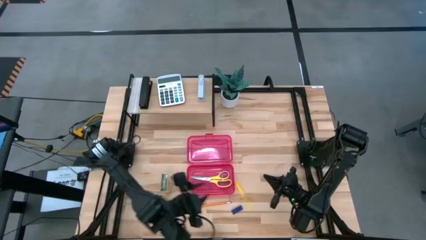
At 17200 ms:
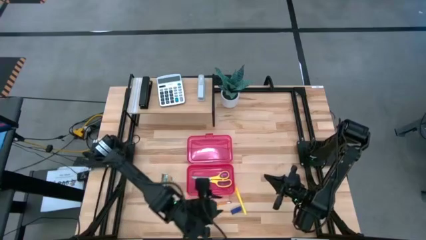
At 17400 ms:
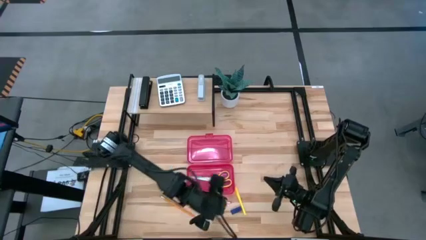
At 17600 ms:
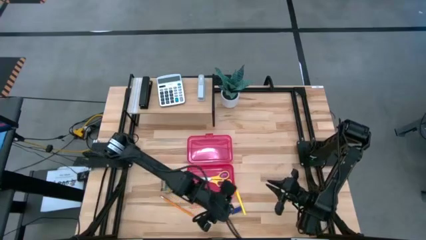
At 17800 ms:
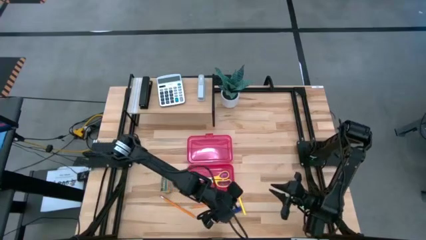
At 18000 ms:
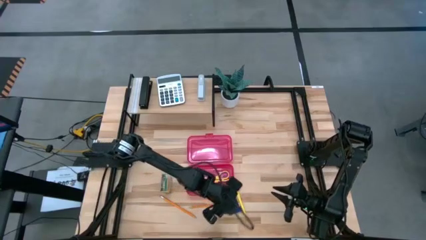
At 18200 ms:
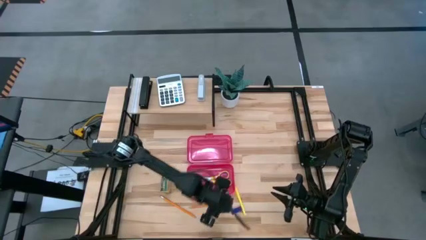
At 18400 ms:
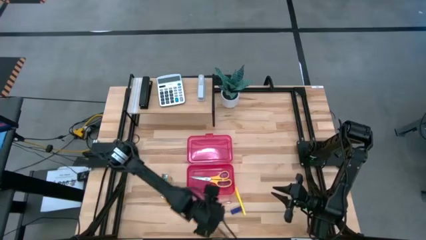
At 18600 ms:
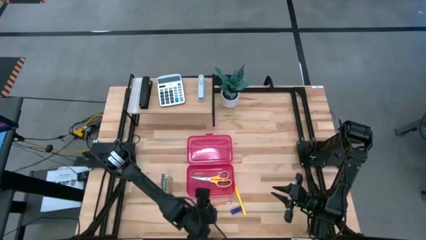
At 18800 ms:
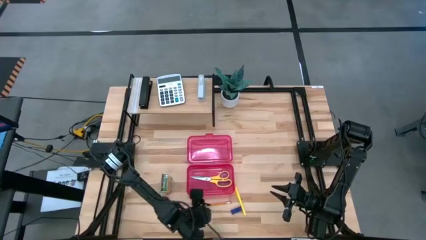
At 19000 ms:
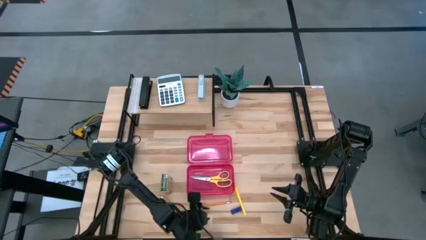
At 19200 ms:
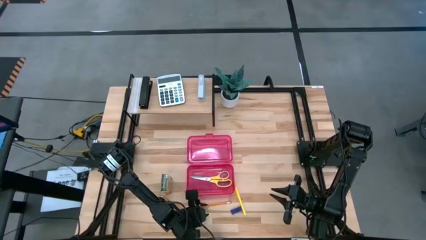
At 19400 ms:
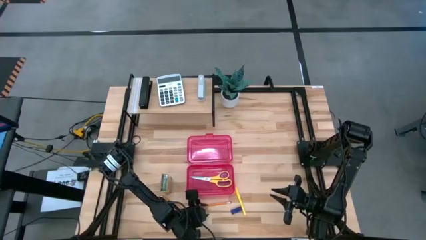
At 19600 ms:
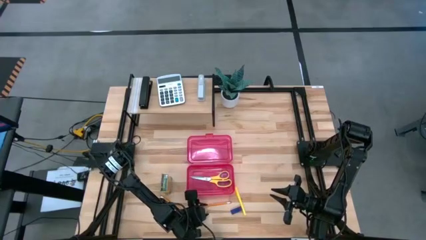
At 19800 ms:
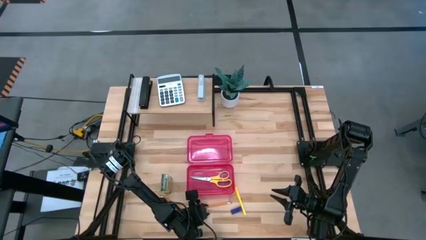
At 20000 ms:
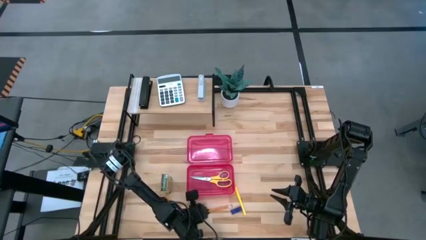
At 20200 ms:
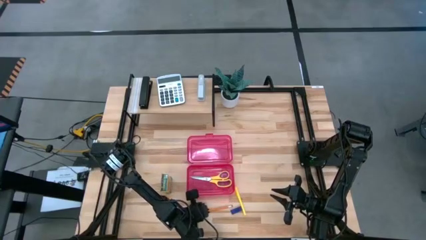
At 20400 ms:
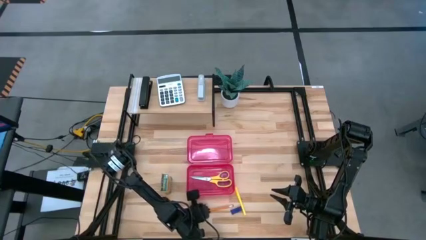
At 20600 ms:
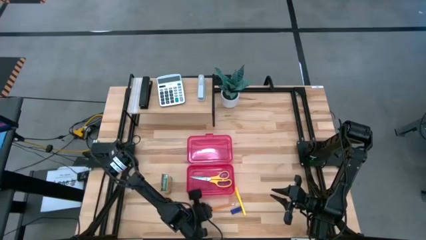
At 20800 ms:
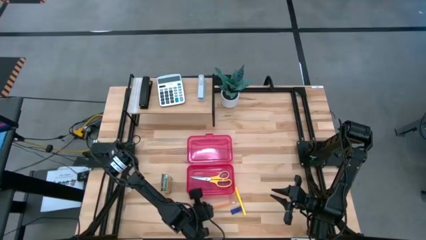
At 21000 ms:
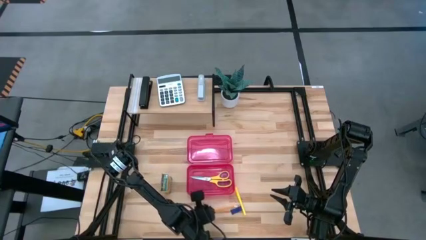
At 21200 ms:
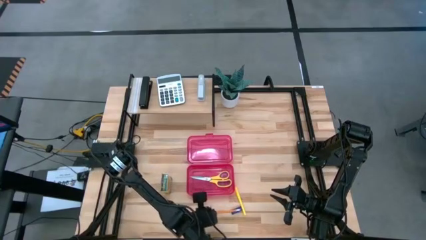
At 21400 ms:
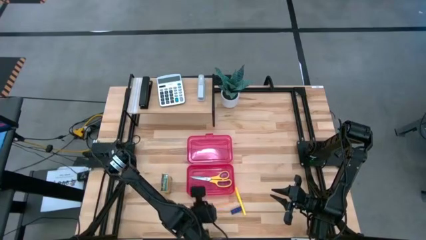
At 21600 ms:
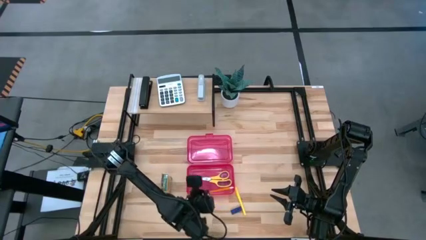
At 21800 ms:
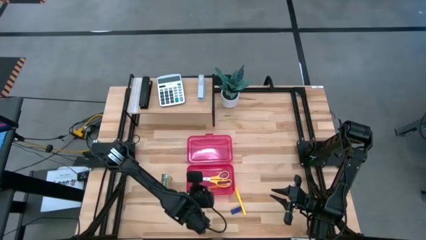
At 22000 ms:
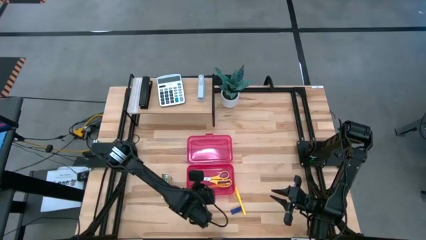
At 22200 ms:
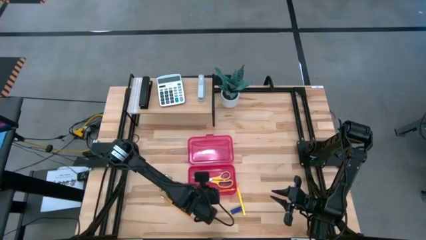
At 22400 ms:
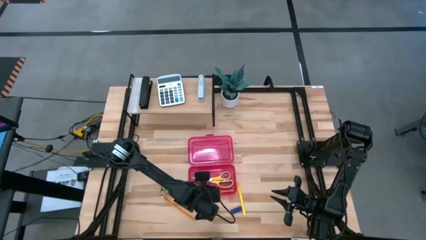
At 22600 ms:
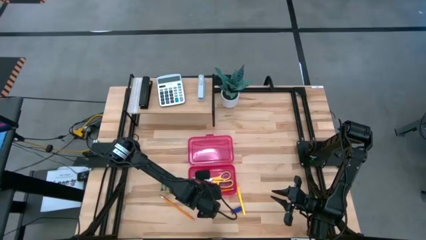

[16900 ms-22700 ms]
Task: Pack school essentials
Put the right orange pencil into the red supply box

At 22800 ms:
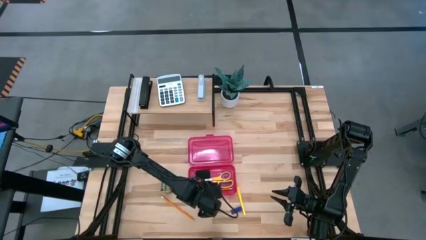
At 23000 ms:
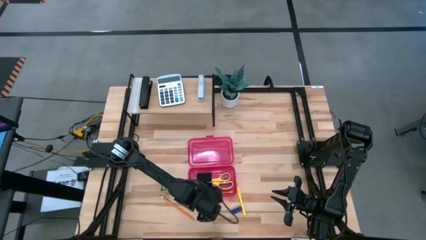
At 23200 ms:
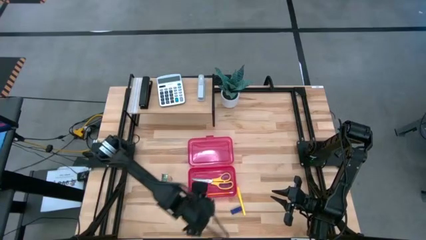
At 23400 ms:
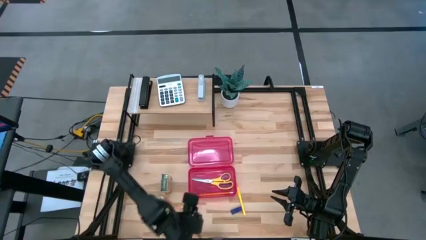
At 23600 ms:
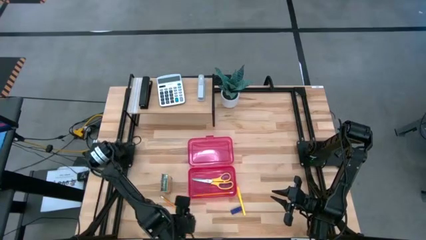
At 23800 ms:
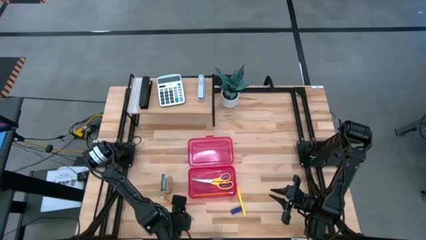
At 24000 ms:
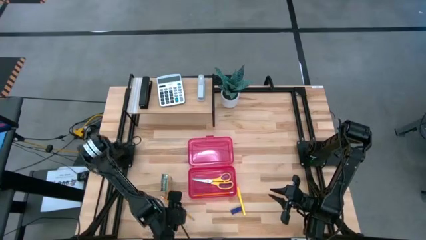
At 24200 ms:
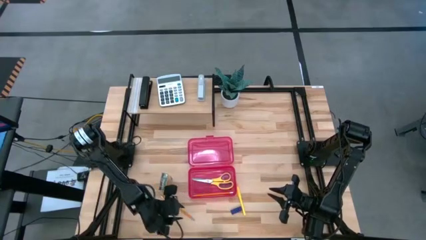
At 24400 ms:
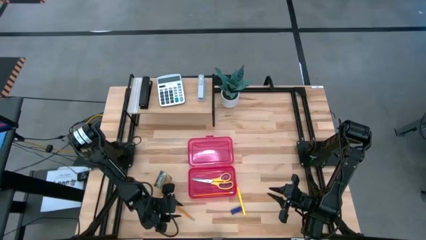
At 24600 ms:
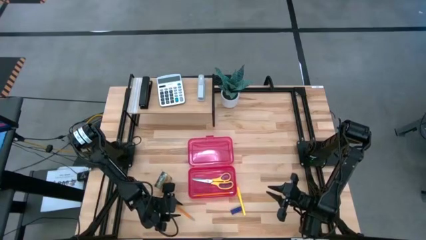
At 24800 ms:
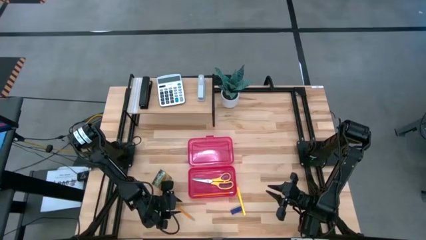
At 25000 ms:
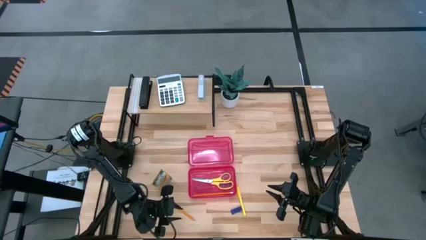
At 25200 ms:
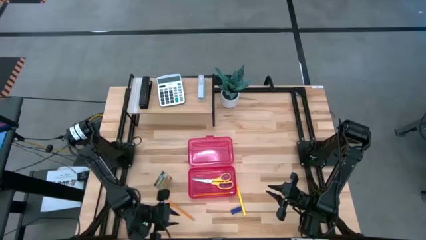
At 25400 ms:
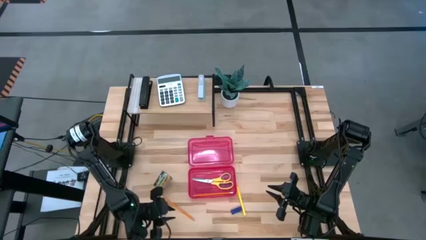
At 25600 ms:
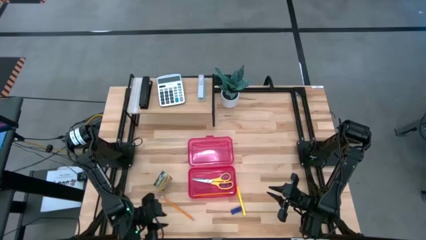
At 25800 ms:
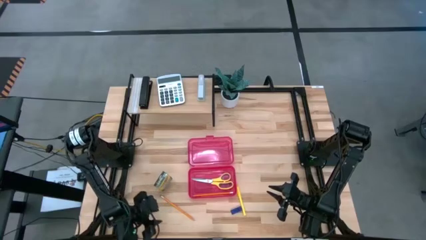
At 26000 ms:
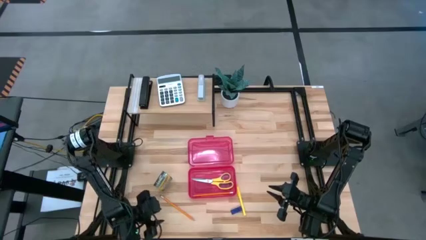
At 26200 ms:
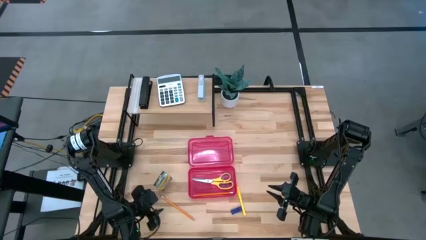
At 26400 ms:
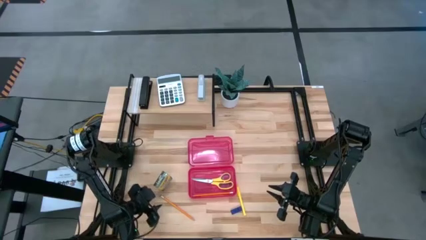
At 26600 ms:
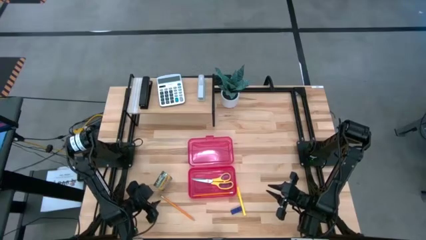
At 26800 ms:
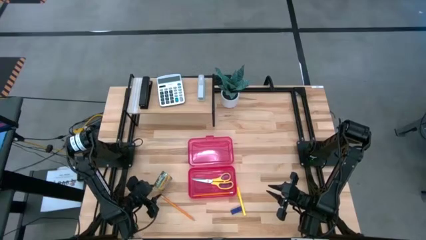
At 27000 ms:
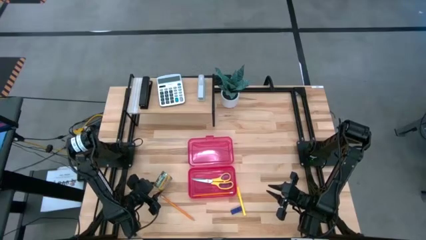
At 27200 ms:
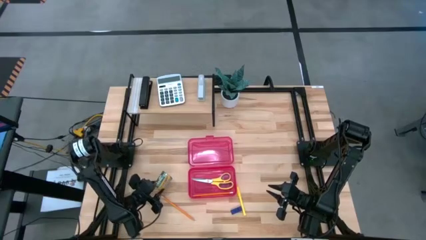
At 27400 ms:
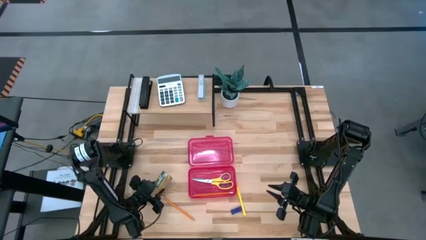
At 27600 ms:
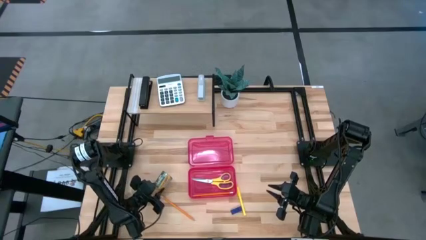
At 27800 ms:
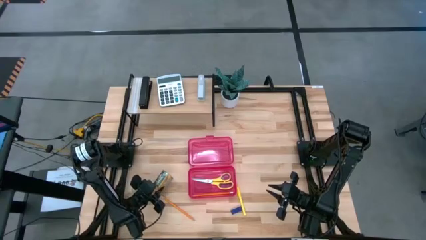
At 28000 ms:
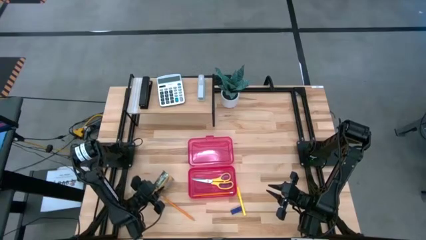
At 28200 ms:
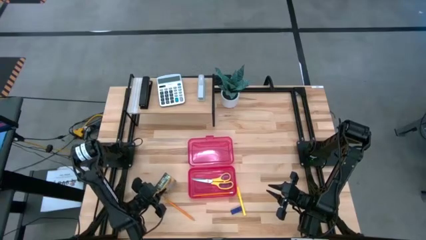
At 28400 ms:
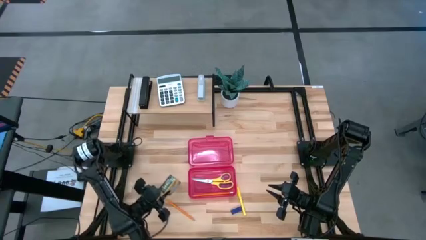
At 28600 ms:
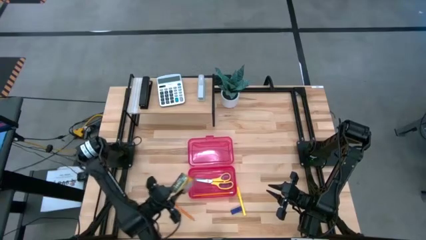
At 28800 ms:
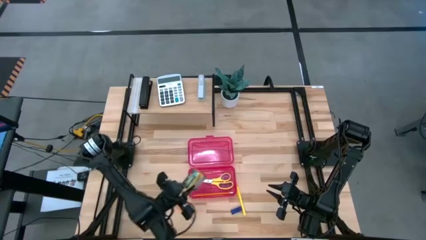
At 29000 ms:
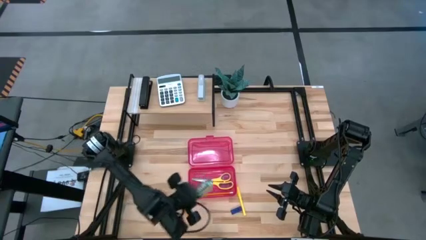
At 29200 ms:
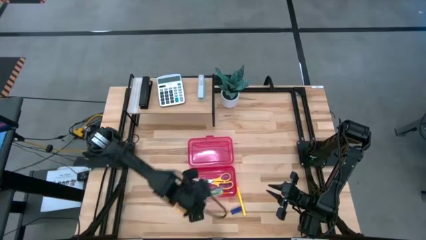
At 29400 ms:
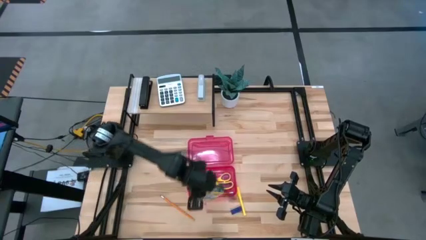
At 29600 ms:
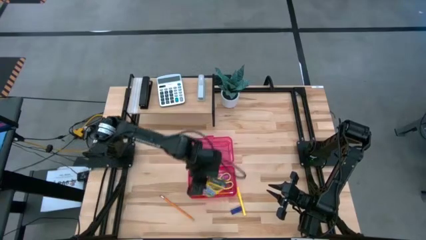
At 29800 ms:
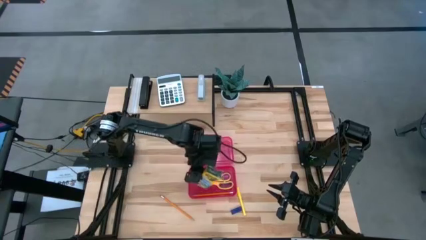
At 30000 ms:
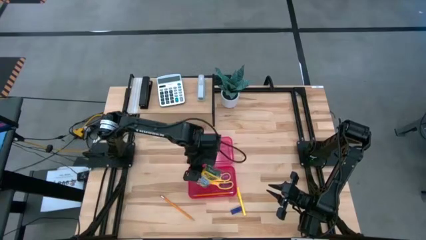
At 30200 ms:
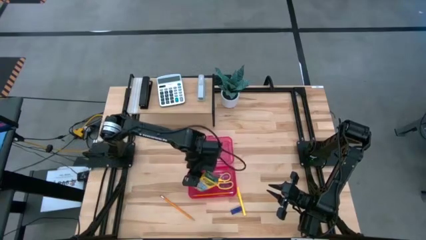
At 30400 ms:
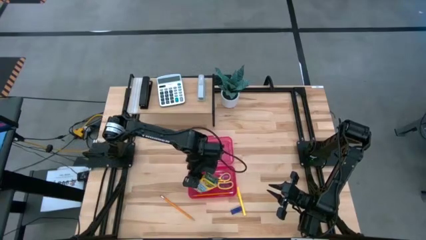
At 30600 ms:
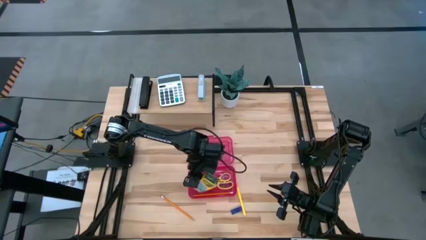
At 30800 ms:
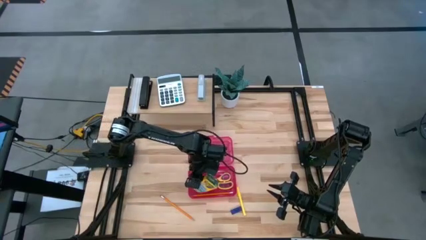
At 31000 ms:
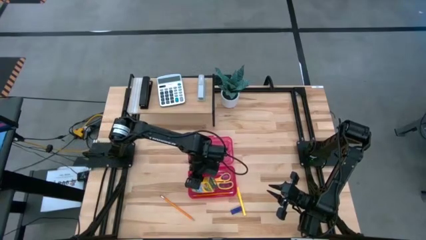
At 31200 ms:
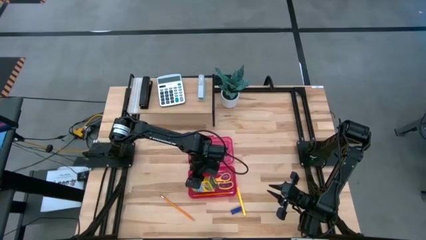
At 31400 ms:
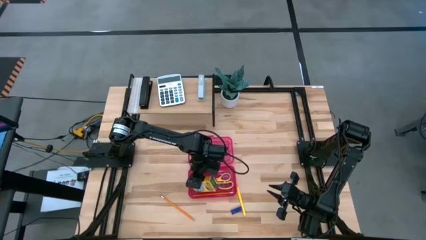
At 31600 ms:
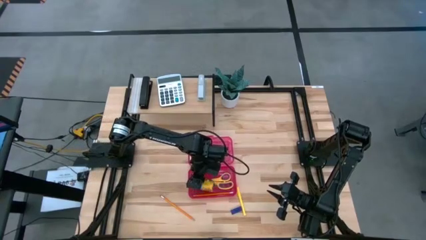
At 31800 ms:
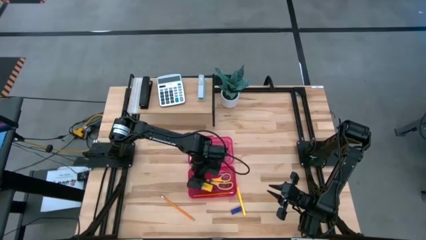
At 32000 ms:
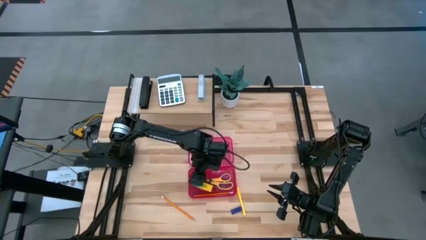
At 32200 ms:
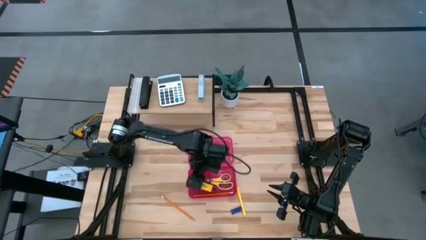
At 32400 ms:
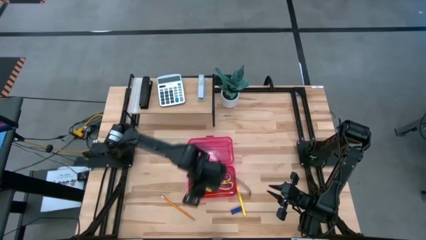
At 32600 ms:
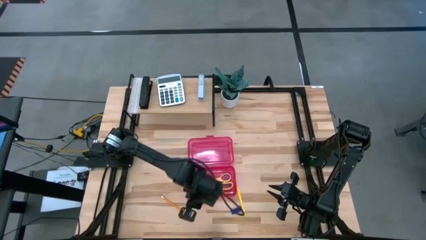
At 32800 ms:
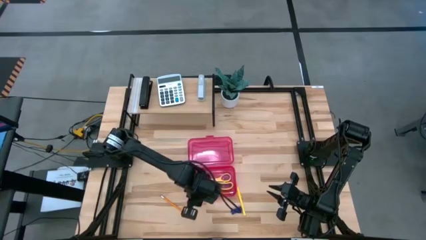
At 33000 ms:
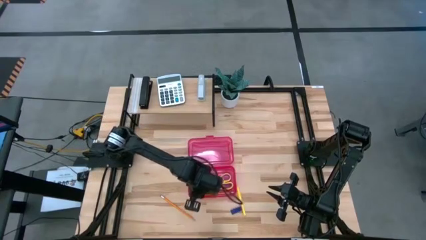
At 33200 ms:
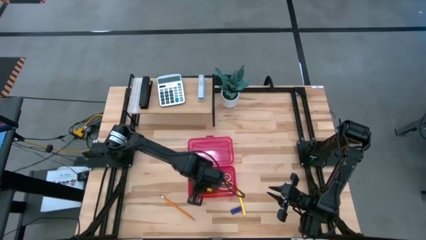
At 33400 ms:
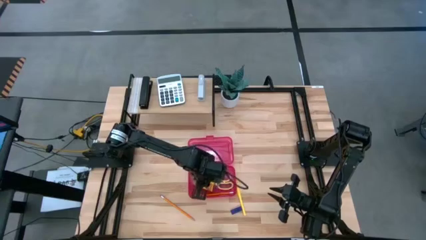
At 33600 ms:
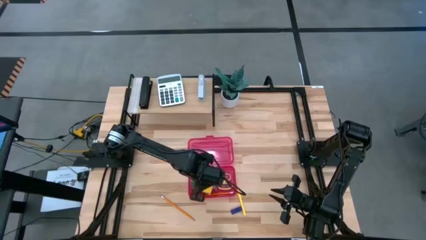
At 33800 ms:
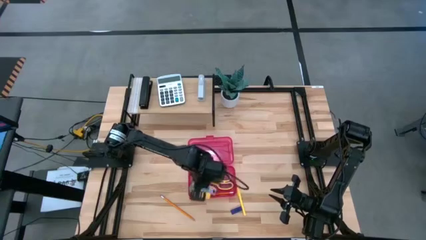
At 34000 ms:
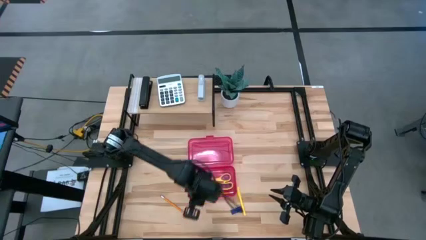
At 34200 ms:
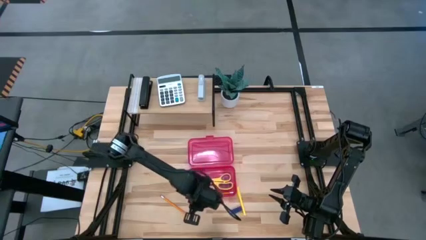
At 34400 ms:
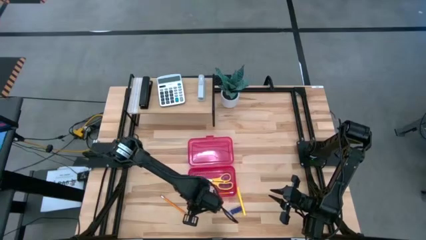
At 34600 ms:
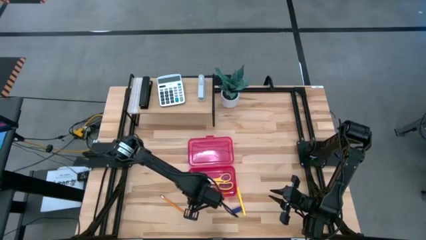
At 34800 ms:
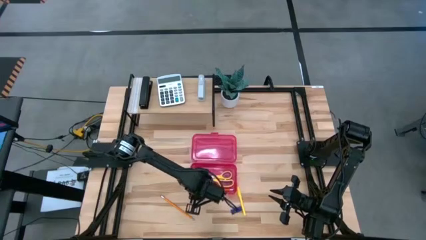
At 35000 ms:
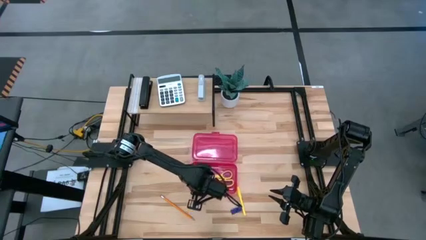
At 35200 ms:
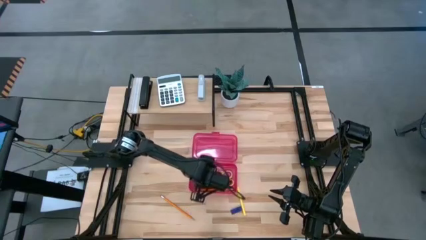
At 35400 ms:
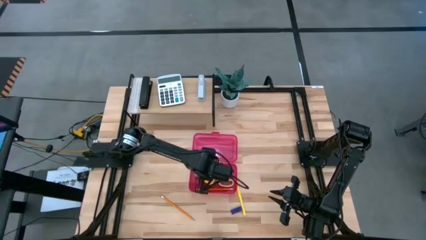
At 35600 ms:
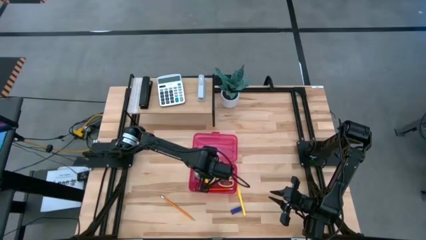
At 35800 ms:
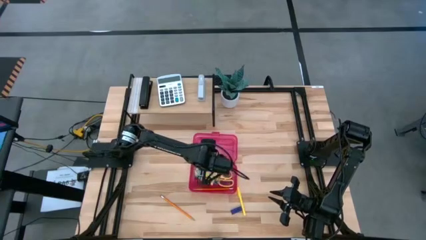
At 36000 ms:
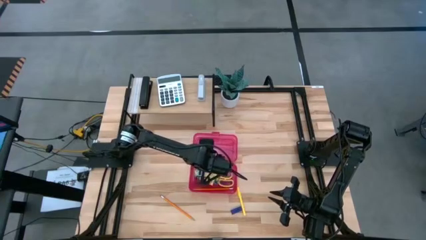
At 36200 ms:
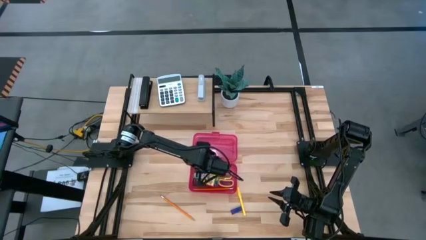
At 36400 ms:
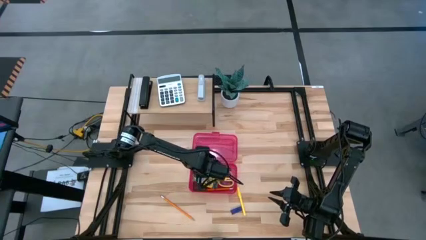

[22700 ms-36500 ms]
Put the yellow crayon box into the red supply box
